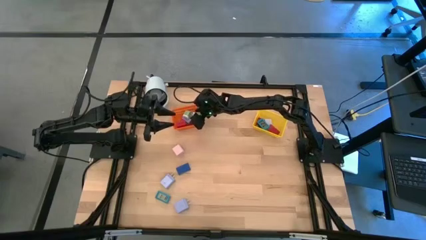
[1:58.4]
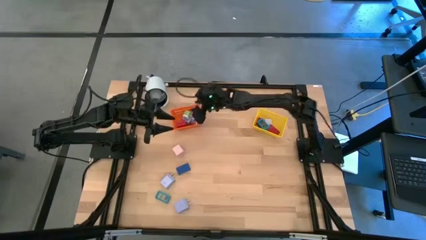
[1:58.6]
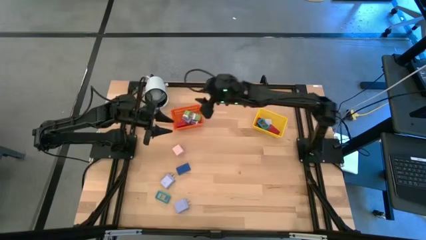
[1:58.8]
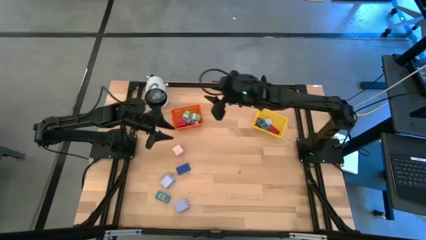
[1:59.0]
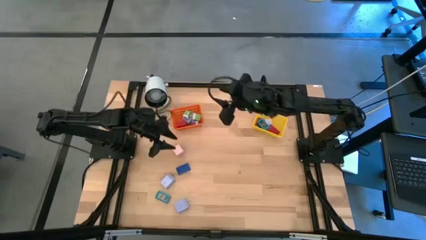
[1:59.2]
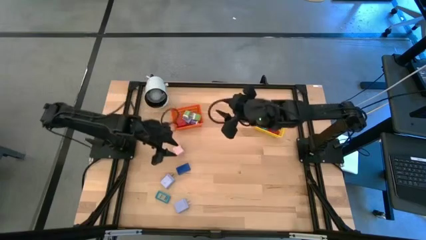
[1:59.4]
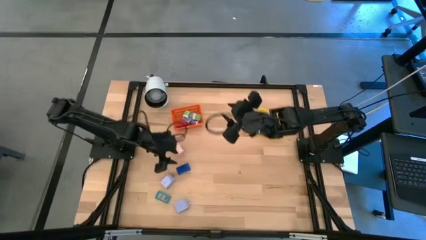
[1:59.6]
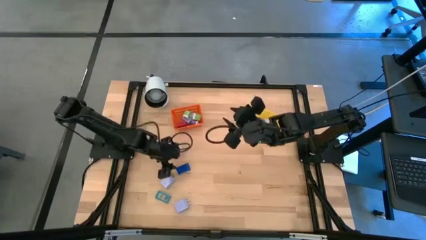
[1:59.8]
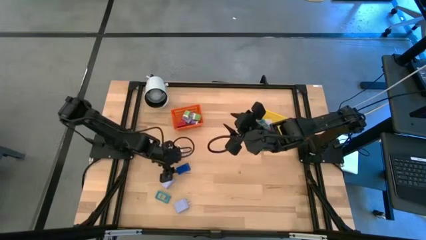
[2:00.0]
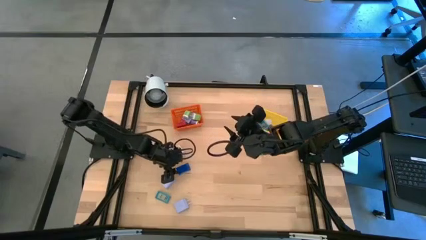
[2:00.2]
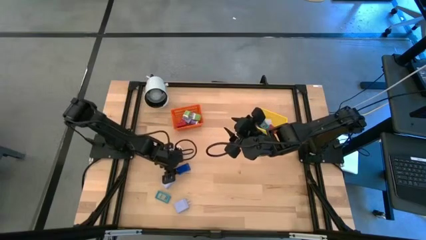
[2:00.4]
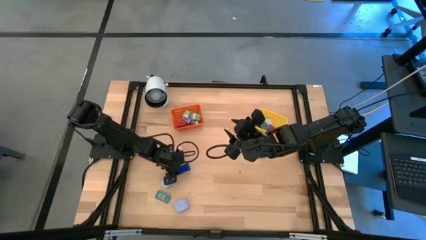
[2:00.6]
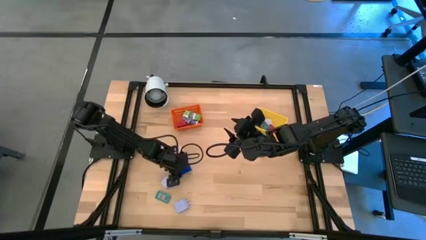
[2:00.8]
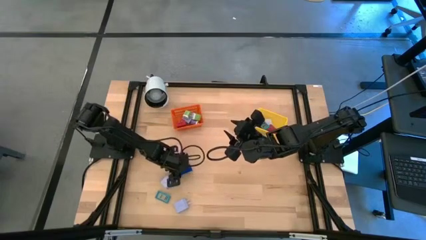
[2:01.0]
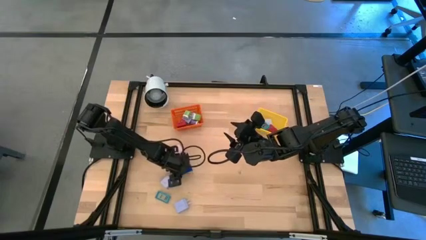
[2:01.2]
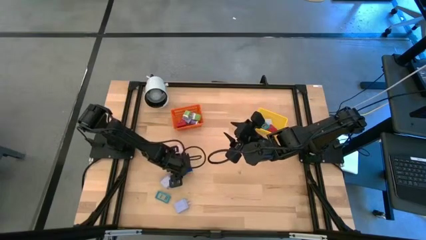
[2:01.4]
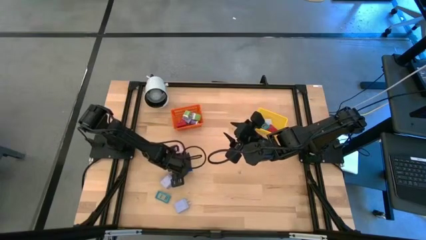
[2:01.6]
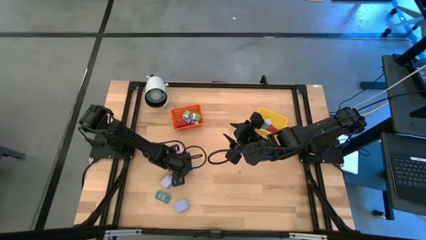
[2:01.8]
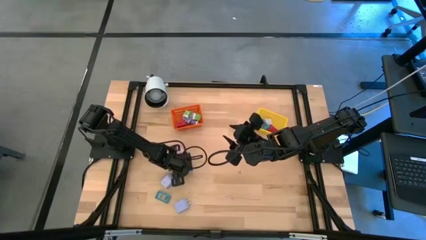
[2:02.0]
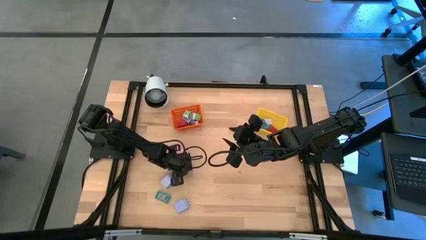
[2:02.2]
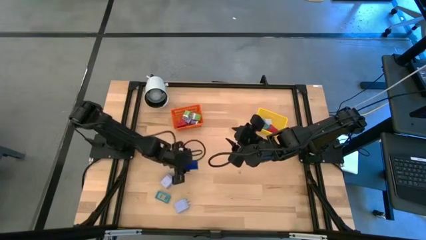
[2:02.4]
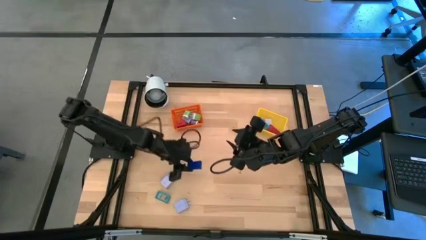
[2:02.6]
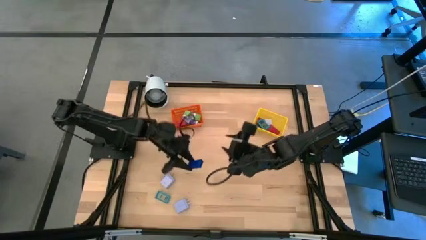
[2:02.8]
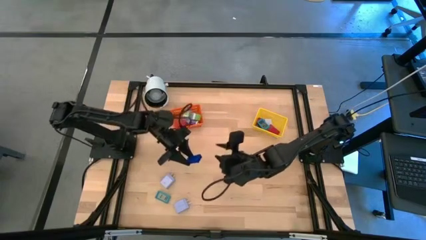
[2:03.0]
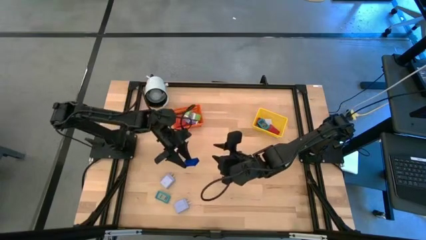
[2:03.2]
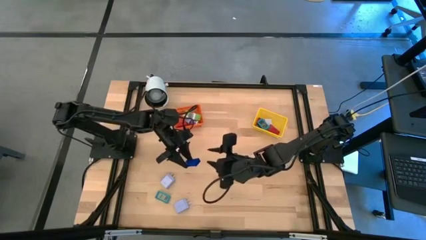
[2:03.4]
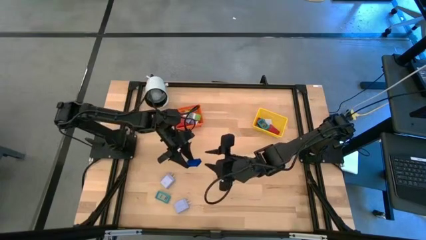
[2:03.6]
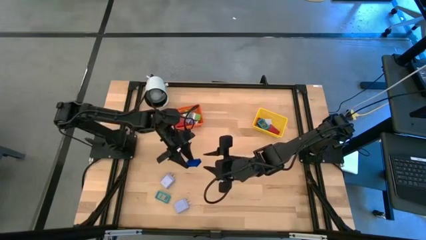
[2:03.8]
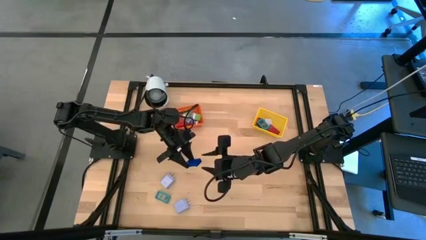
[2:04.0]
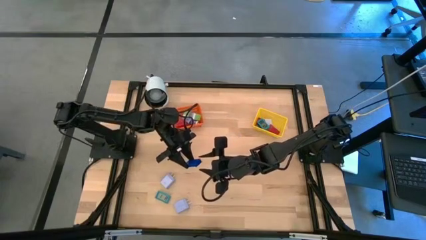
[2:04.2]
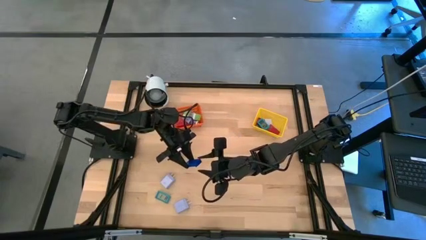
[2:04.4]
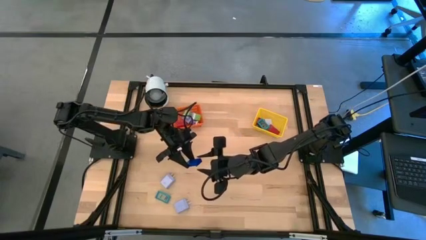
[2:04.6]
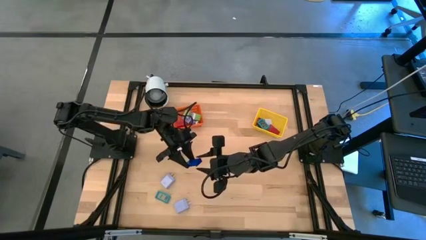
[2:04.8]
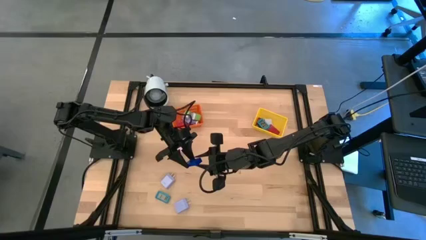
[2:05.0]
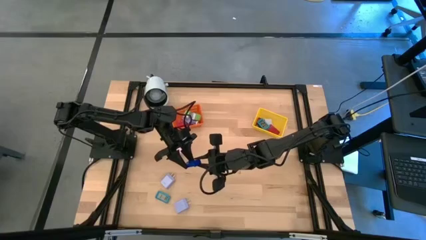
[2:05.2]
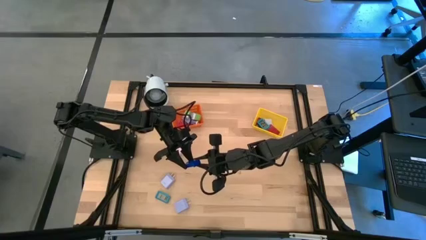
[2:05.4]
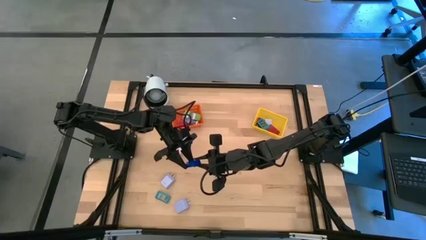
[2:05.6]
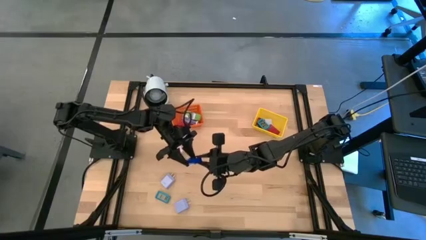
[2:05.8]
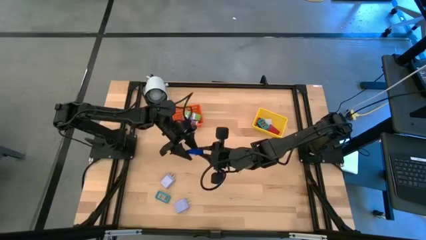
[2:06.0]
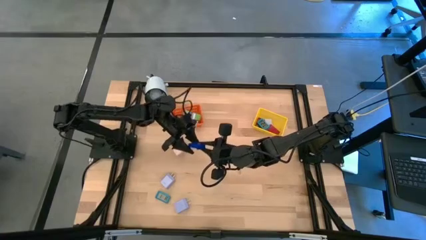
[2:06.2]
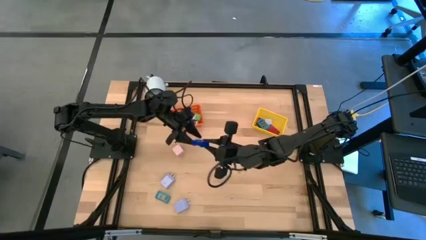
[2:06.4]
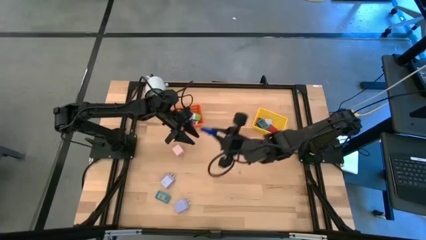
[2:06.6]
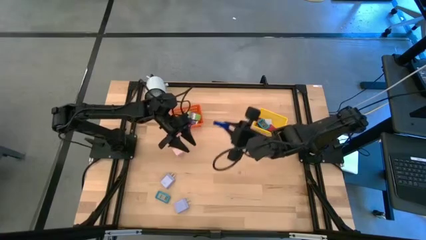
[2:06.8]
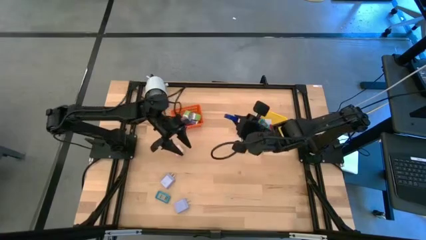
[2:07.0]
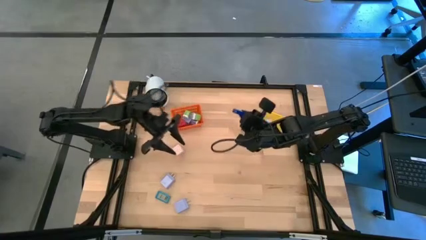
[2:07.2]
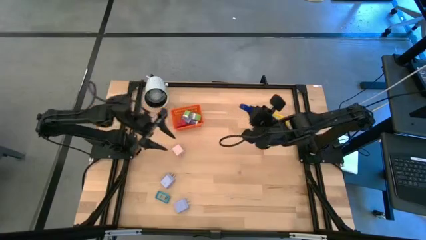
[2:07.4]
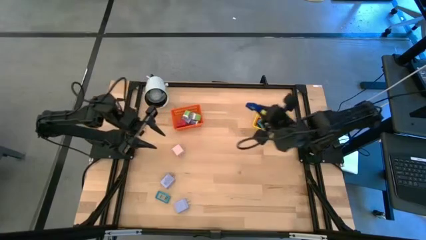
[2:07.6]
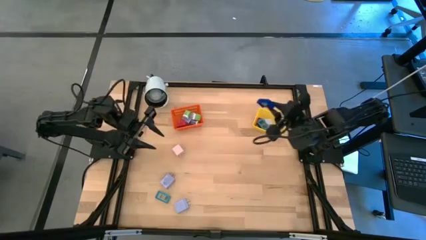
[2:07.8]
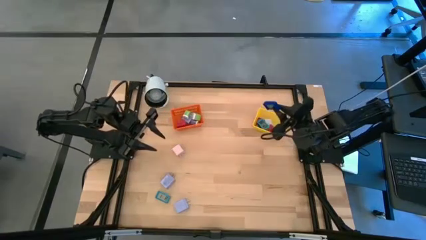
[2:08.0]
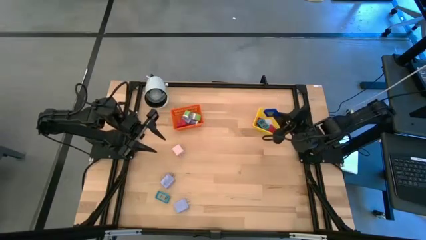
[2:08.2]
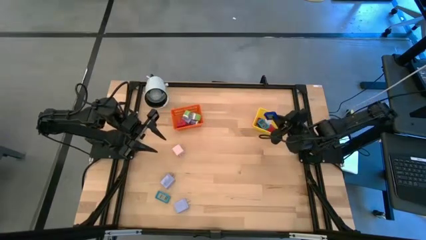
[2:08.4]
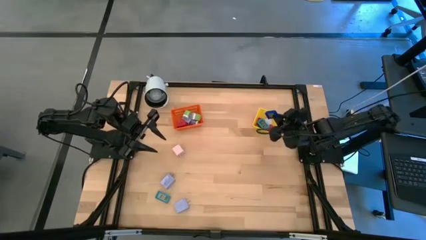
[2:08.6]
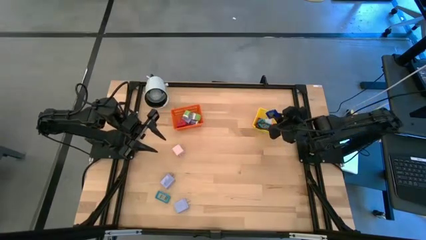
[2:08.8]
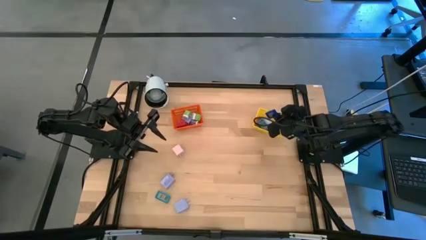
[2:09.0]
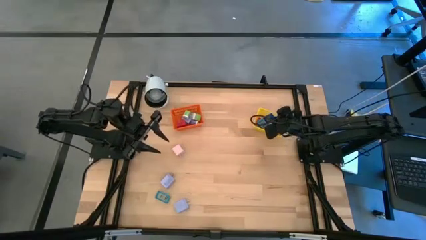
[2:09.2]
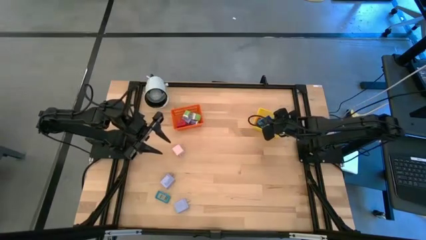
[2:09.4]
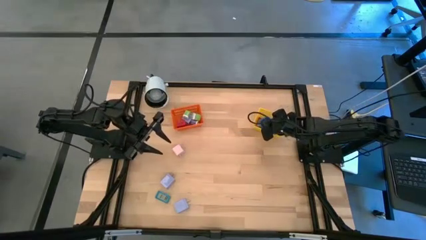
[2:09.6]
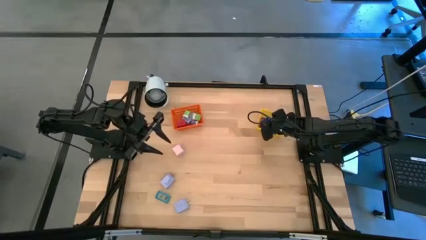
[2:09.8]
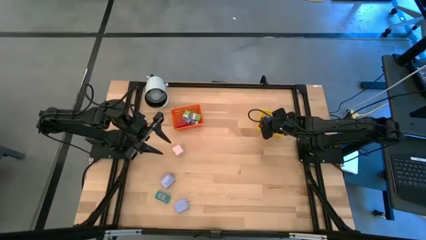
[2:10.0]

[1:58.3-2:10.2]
Task: Pick & Place Office items
Put the blue digital clock into the yellow bin

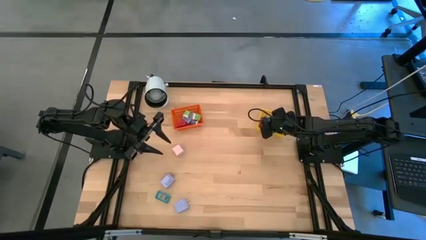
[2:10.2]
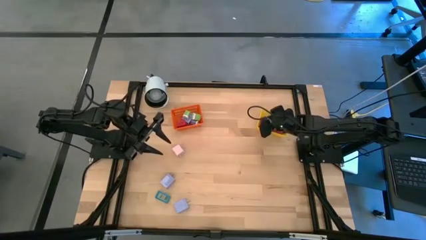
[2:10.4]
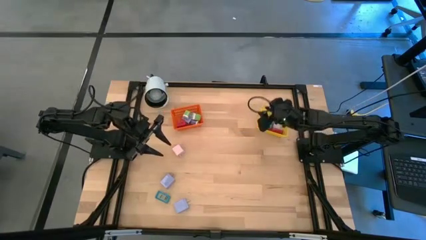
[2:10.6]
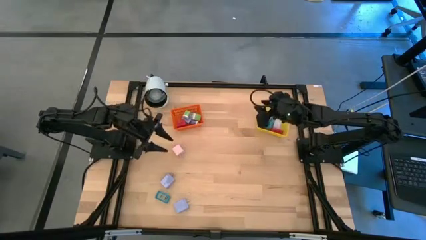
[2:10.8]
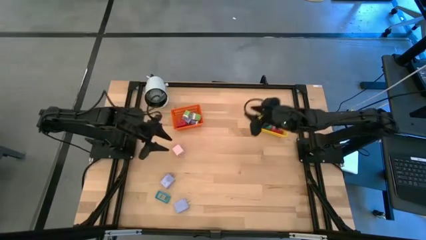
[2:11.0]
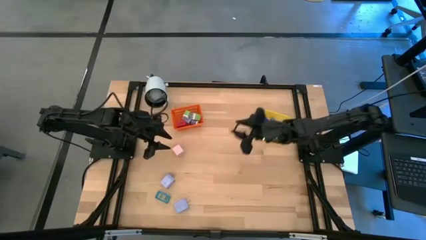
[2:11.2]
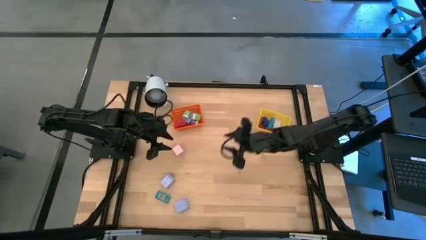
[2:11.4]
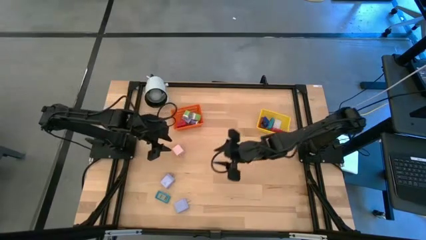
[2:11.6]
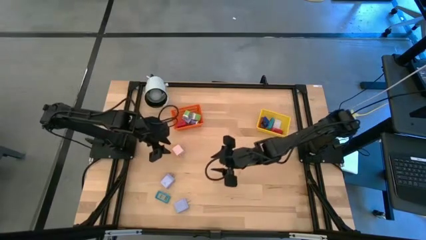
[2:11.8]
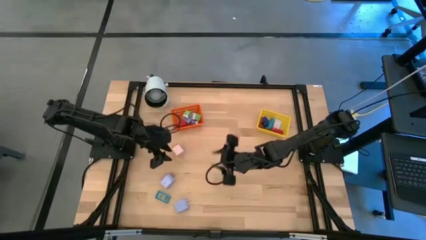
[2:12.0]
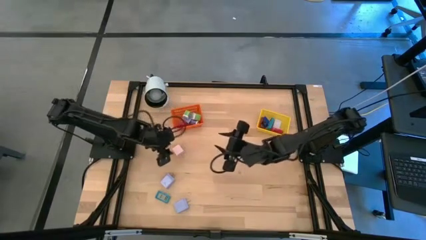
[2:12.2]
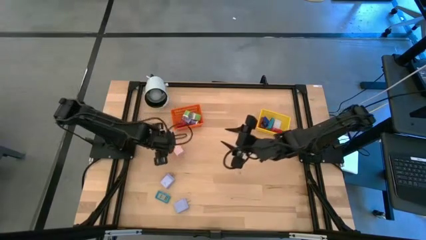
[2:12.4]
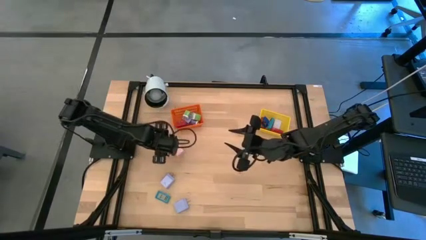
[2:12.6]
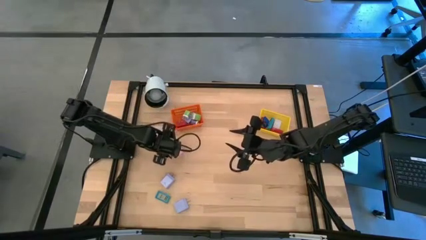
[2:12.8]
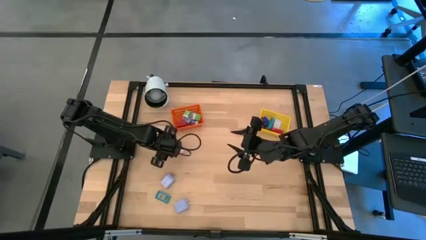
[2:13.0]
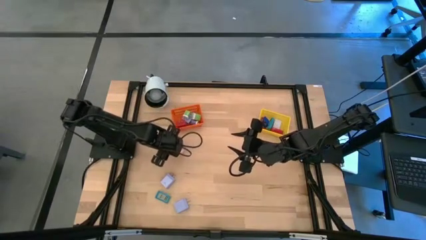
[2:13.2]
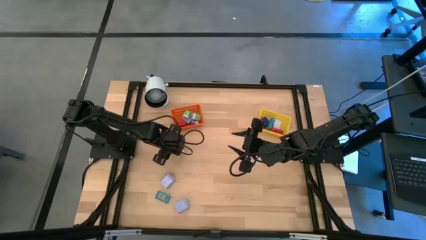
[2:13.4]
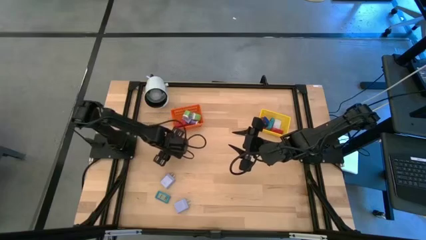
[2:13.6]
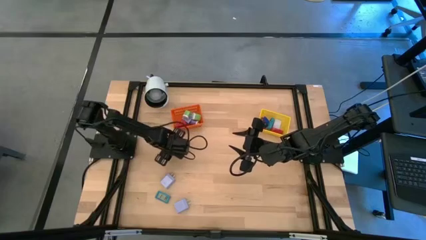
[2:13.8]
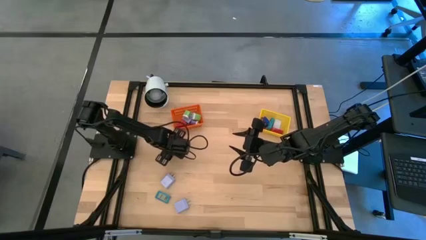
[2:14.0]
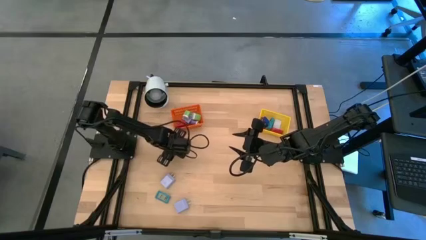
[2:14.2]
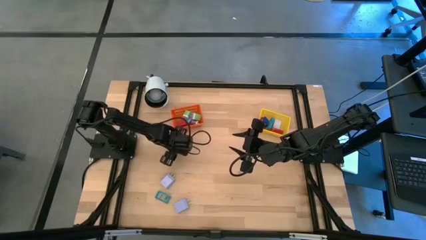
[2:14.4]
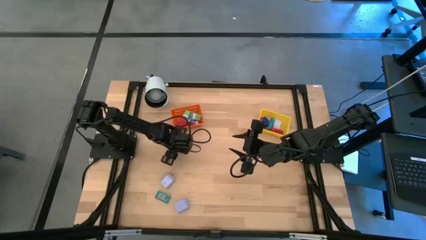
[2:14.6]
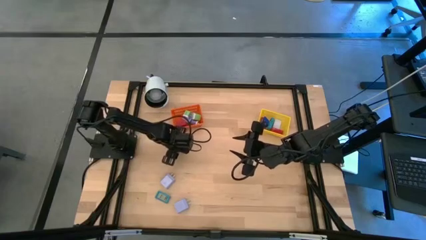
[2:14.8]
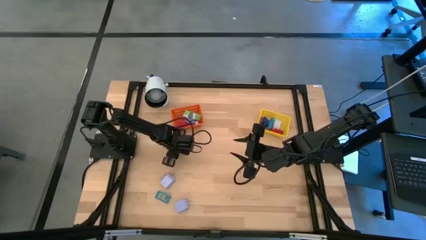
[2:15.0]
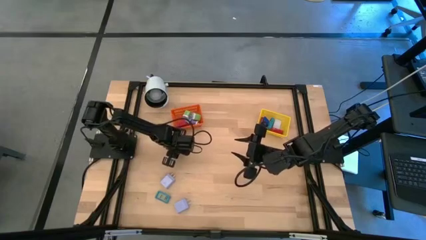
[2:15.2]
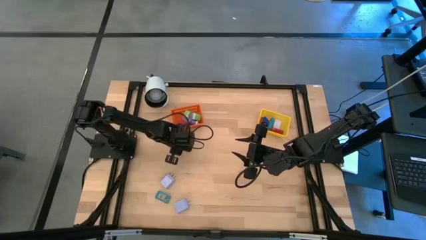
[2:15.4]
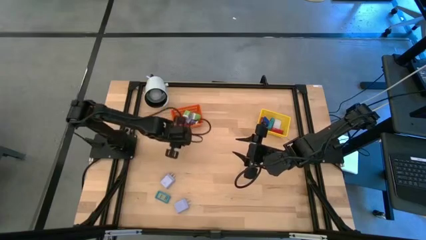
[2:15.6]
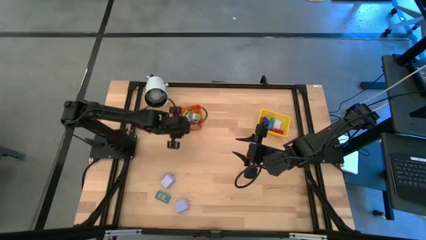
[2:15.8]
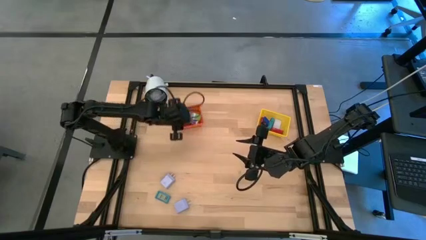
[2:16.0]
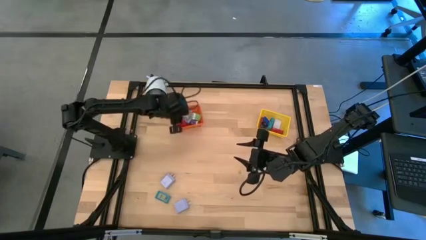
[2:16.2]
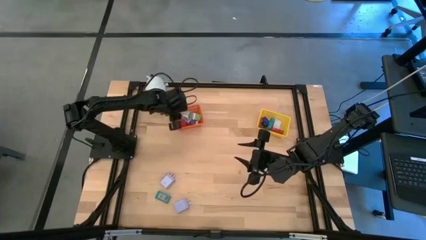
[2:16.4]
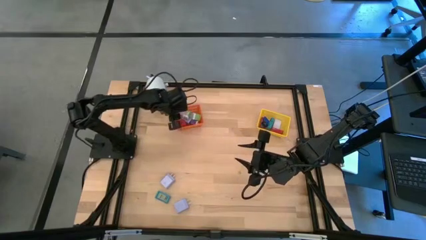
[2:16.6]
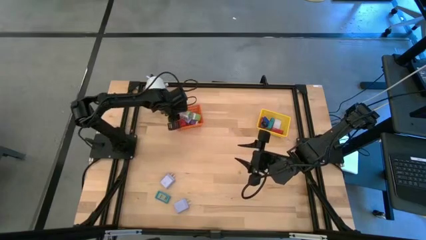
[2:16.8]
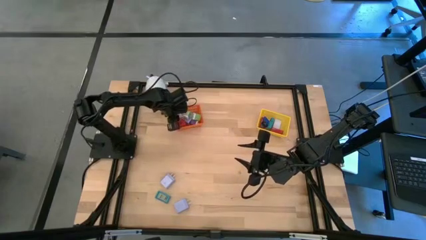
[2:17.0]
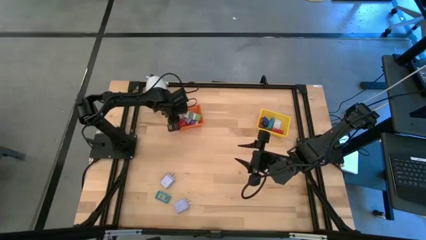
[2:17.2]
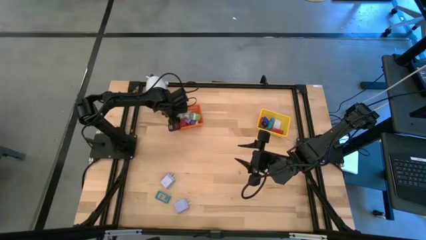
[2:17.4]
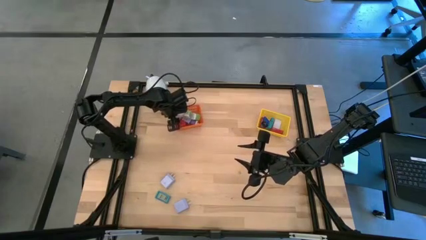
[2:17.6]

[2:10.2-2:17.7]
Put the pink charger adapter into the orange bin
